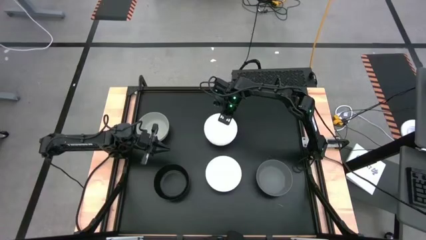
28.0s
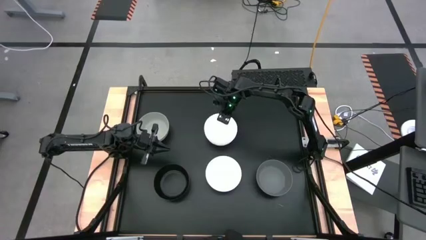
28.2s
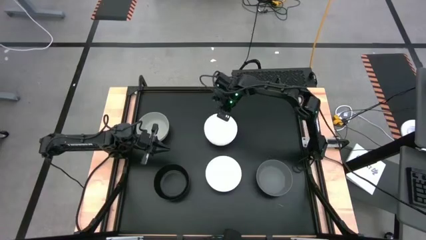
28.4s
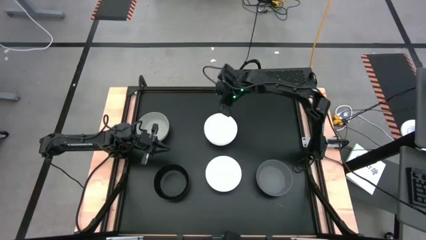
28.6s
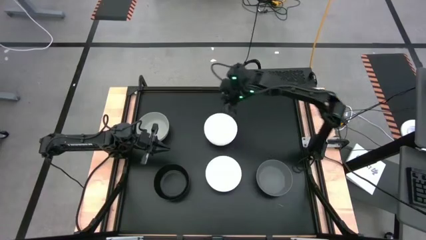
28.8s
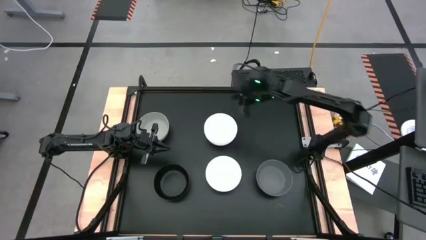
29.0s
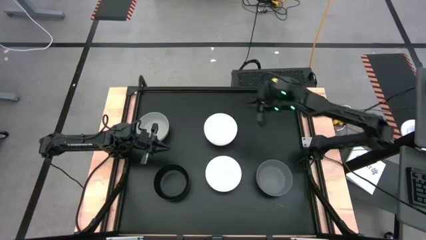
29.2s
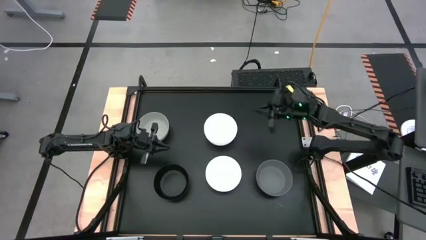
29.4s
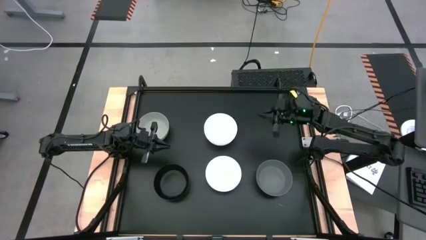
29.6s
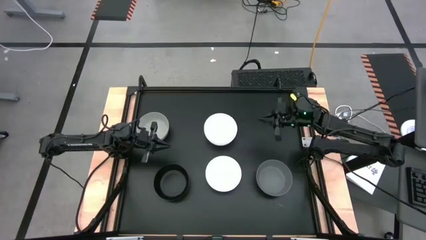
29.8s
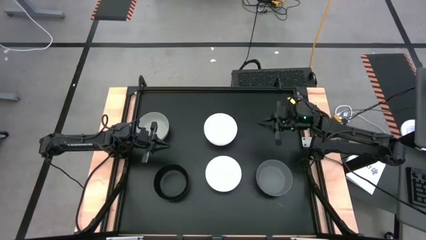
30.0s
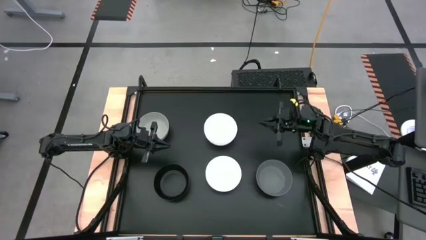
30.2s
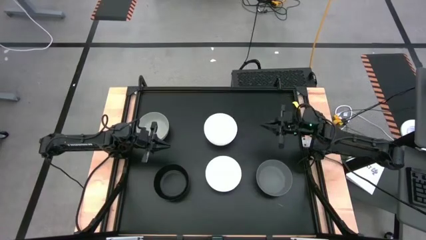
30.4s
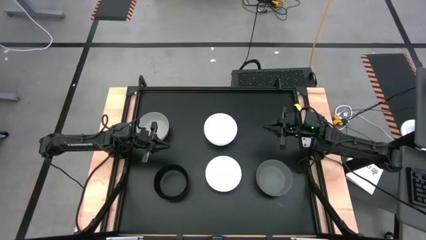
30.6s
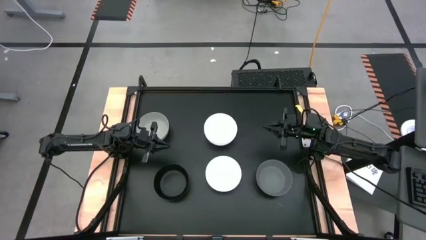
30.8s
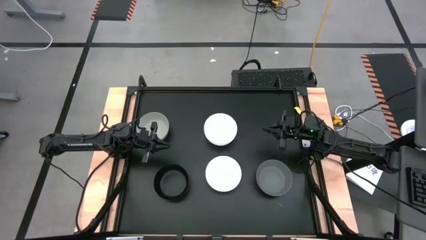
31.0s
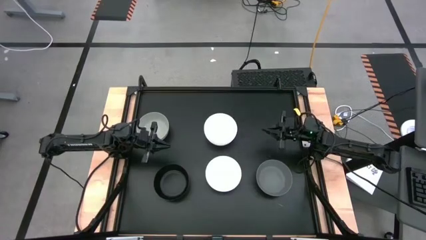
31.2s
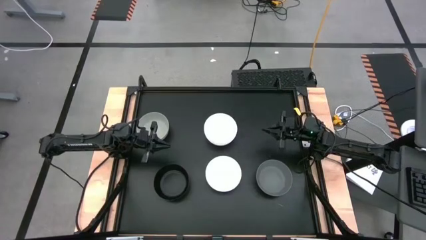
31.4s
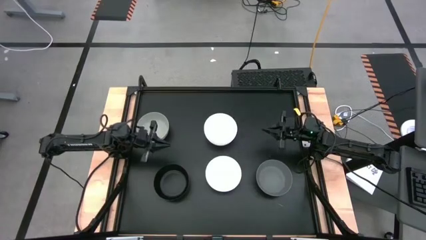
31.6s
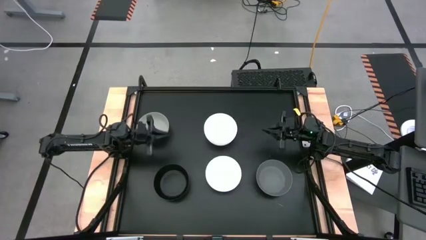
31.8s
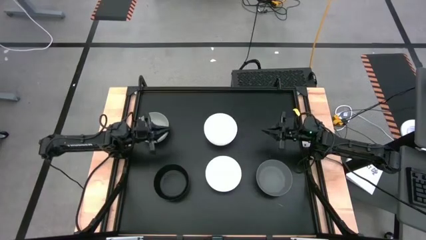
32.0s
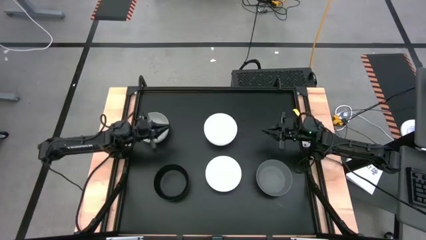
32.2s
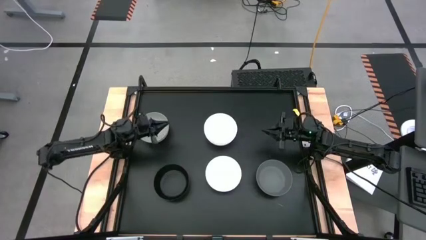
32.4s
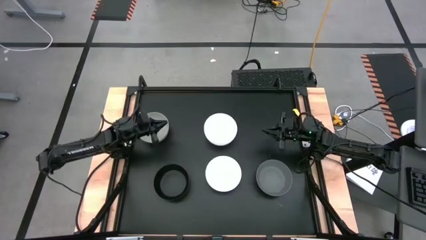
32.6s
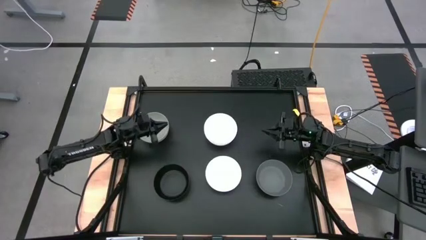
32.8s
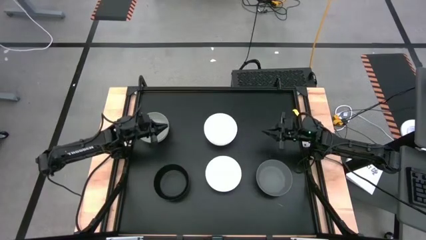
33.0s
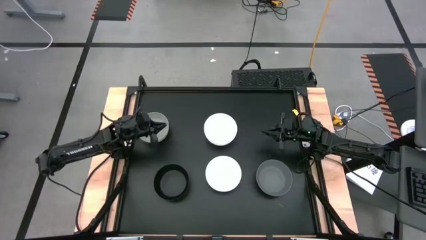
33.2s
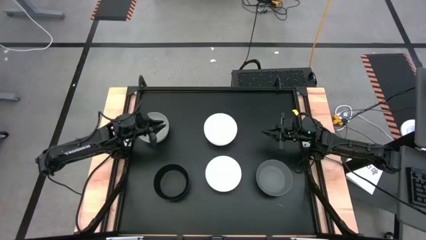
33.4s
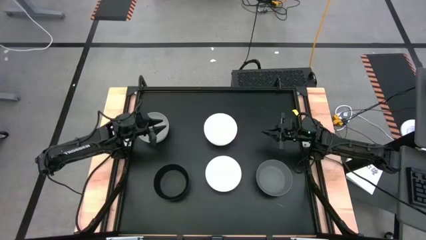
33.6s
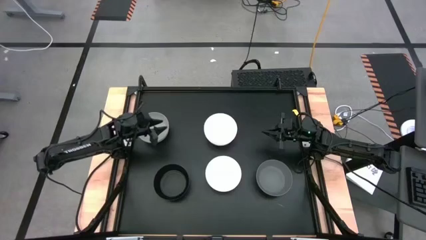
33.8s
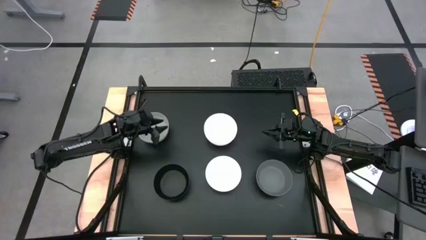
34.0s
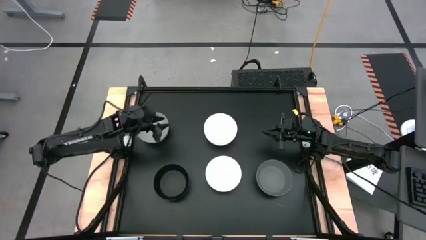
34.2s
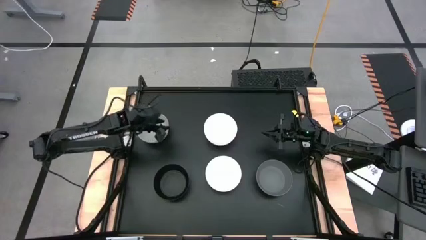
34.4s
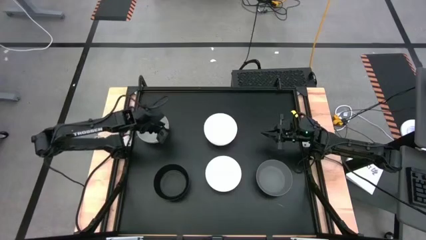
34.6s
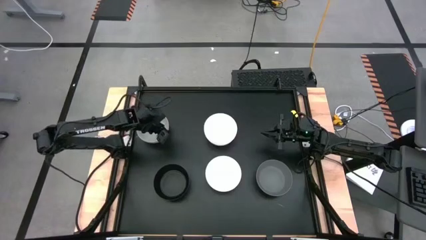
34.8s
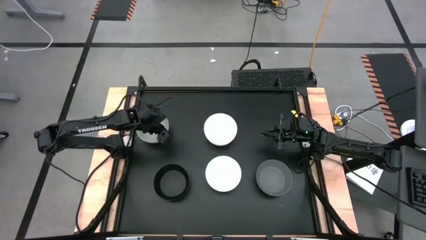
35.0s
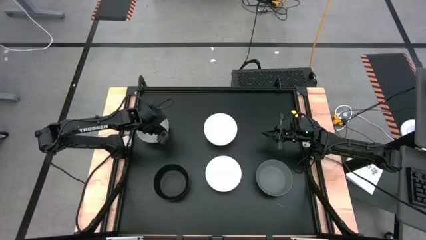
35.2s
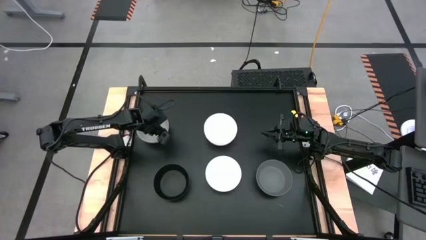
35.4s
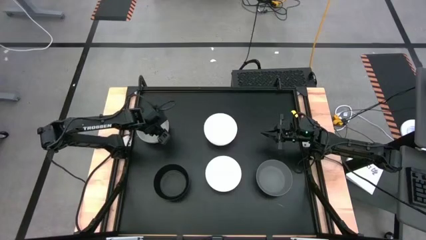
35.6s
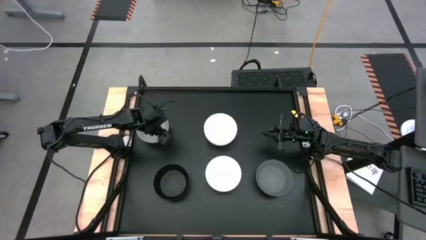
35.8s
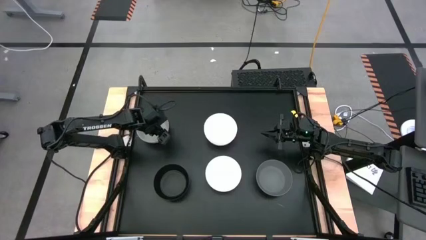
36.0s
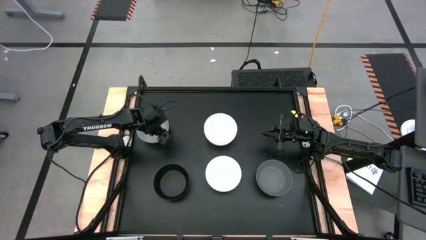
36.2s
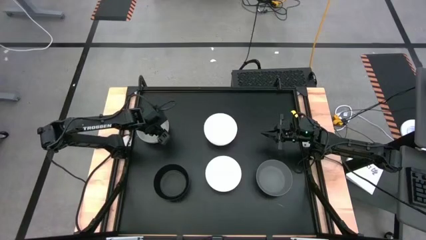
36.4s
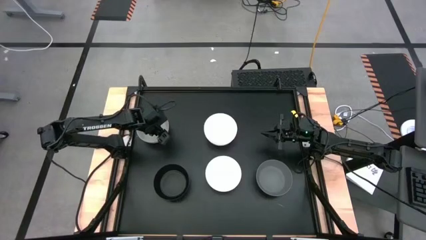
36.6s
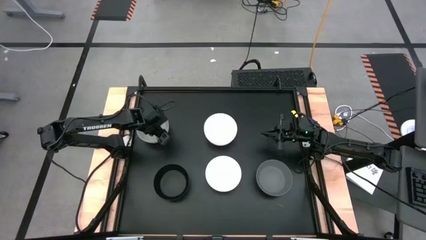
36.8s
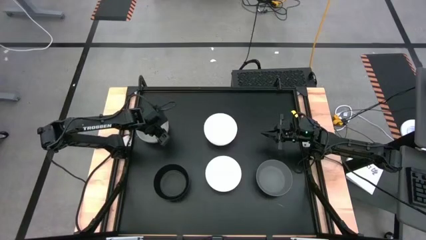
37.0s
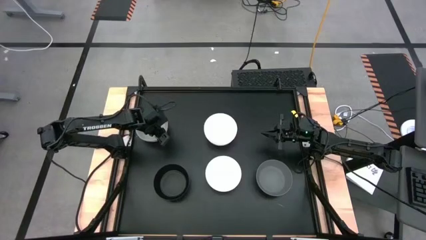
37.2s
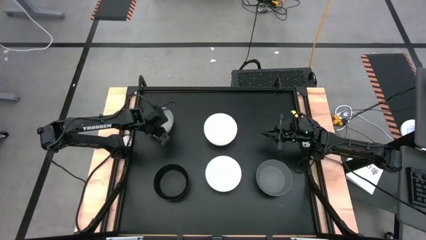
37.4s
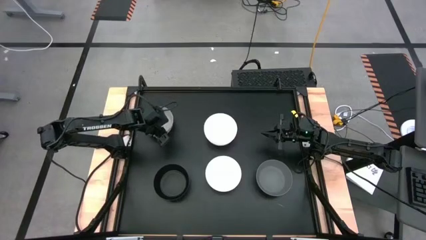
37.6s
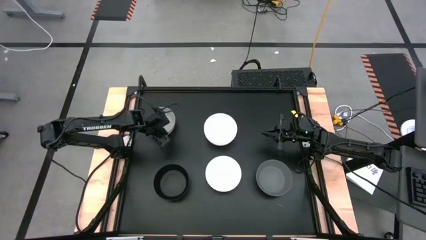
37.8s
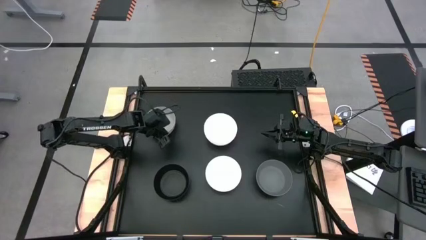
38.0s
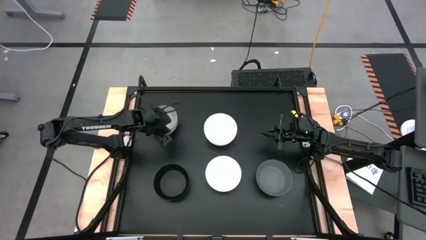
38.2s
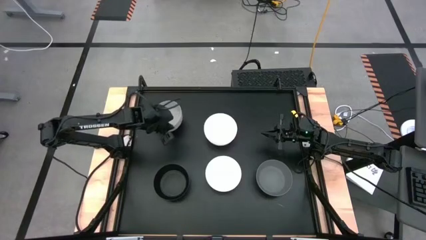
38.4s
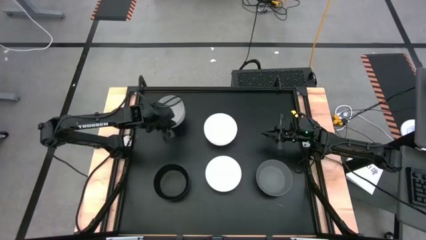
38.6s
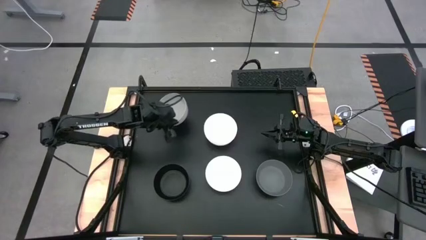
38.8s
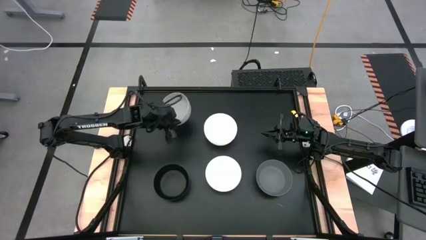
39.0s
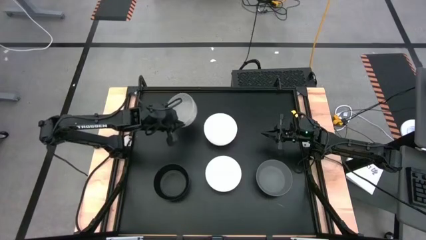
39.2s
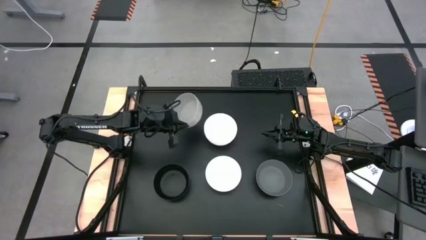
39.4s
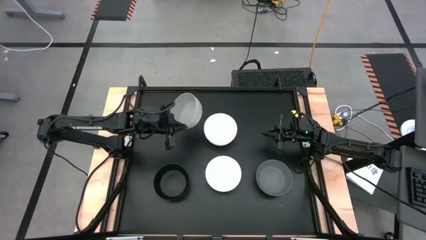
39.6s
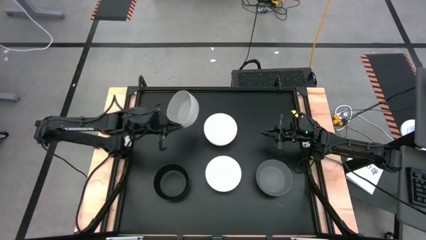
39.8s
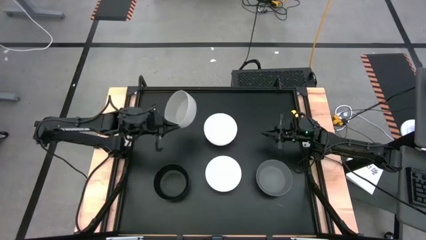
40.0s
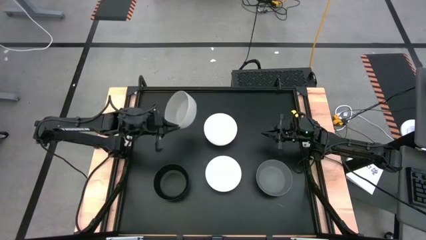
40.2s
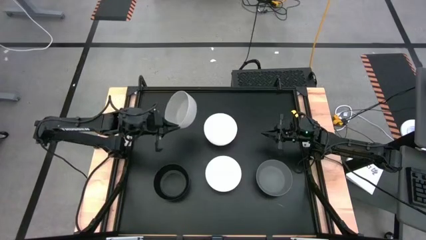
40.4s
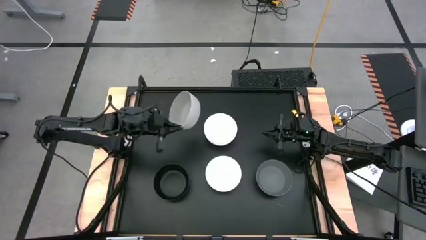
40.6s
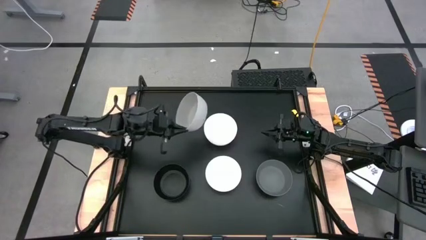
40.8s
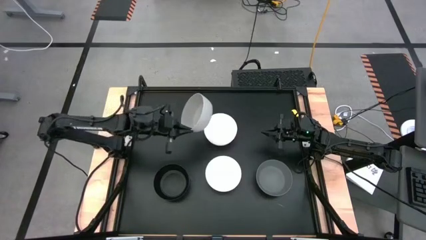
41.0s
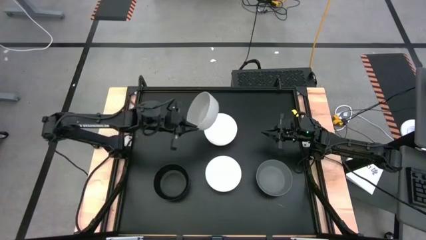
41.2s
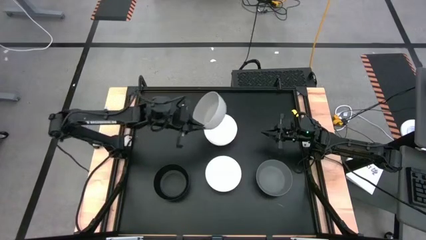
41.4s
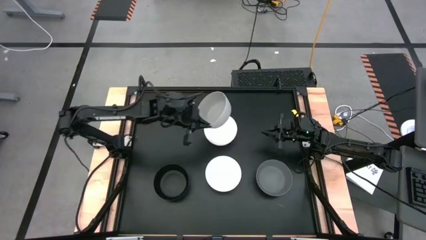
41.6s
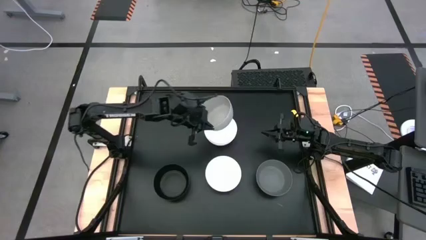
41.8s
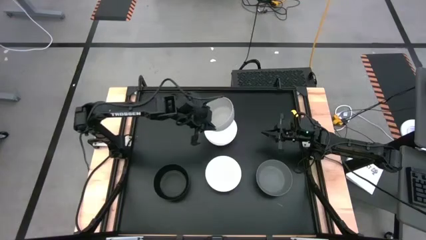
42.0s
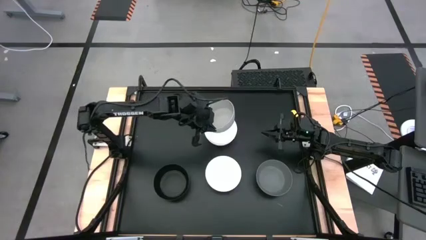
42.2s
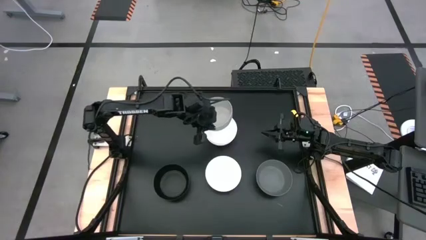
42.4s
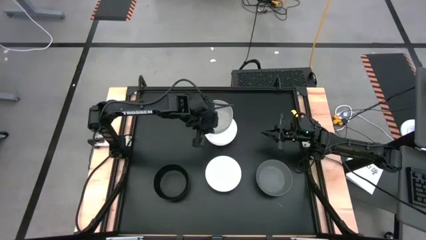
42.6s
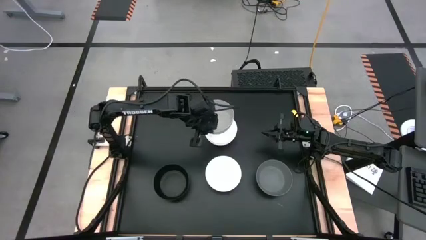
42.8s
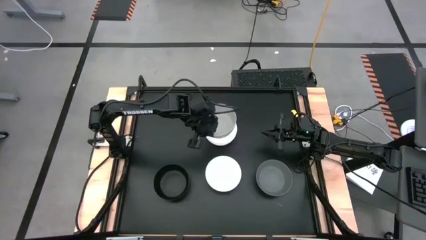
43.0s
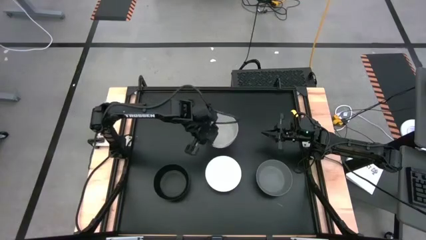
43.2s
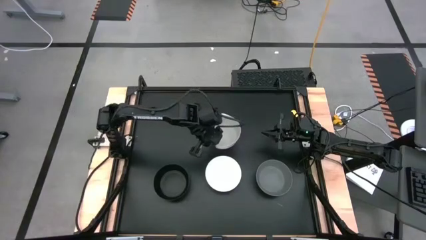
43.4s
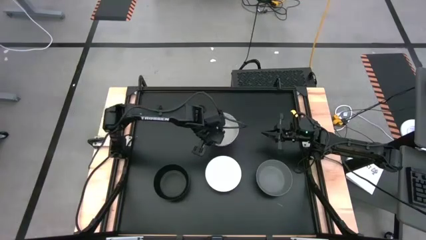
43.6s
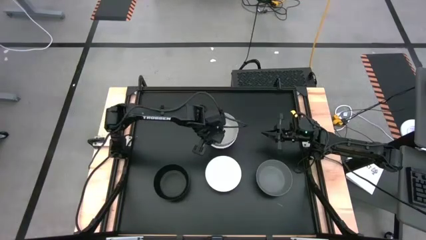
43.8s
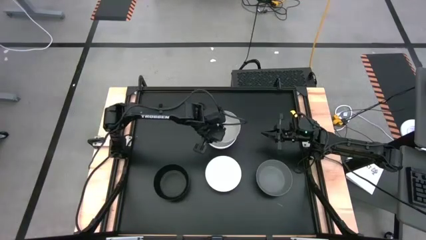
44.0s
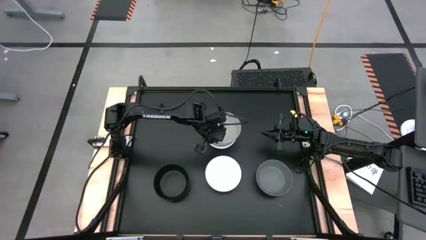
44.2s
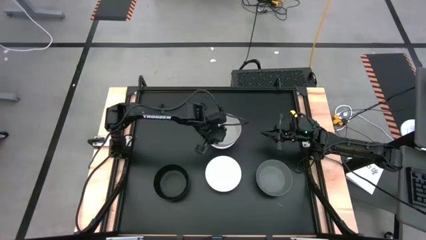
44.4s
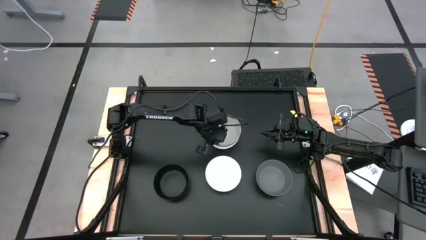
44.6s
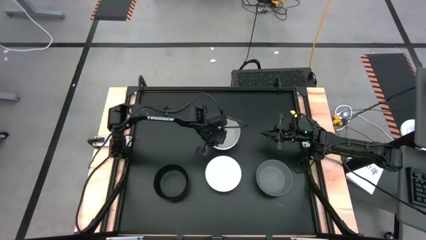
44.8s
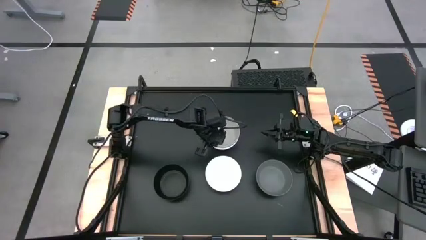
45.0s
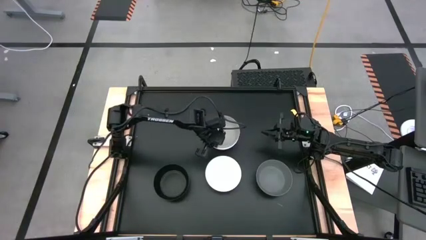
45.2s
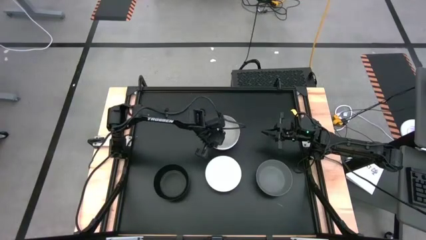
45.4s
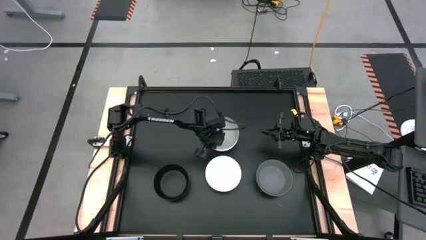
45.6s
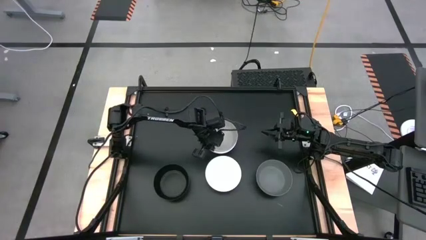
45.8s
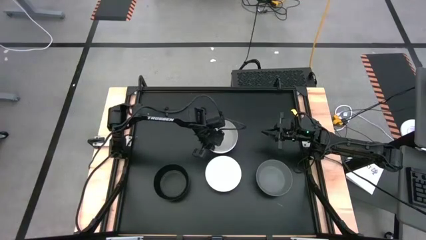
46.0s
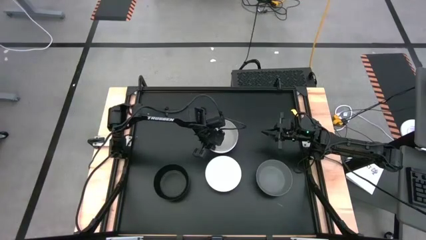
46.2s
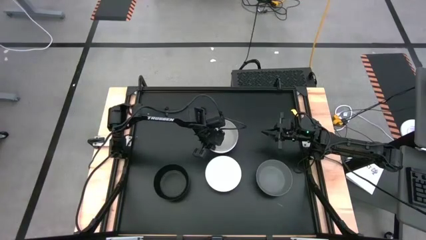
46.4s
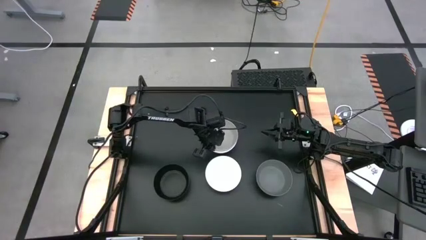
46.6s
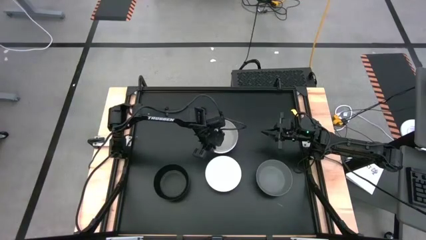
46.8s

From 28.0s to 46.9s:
Task: Nest bowls inside each other
Stack the light grey bowl on top of the stacked white bowl
